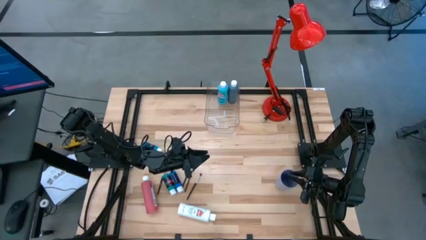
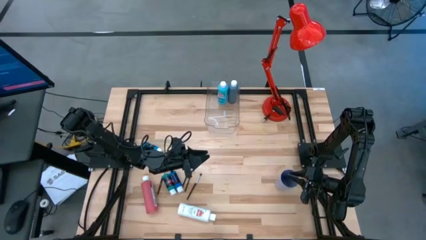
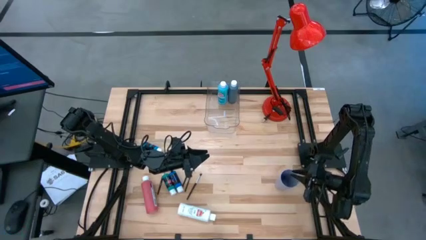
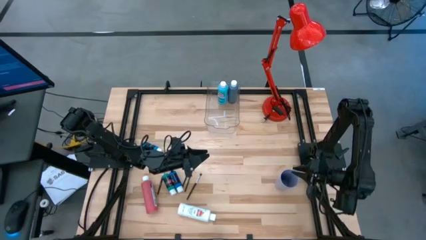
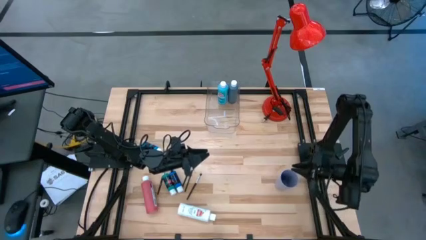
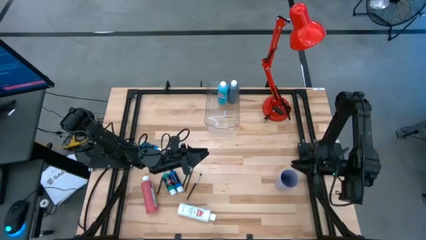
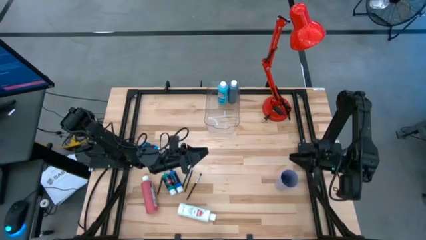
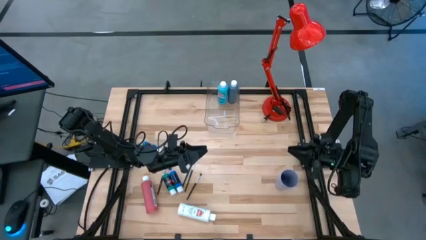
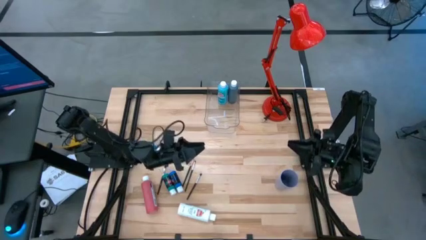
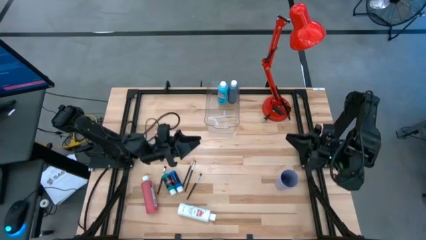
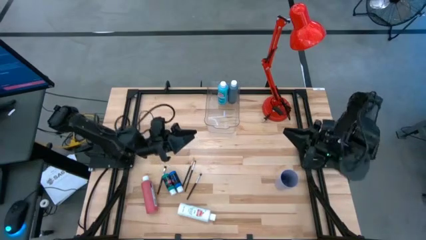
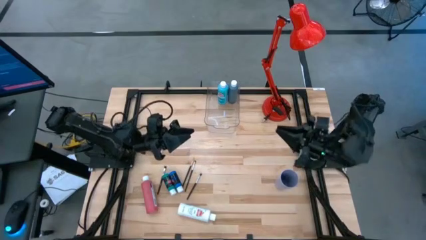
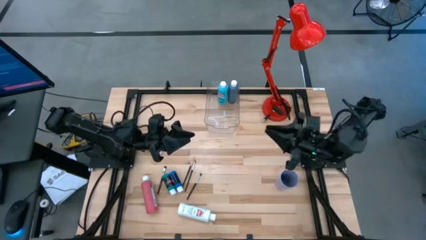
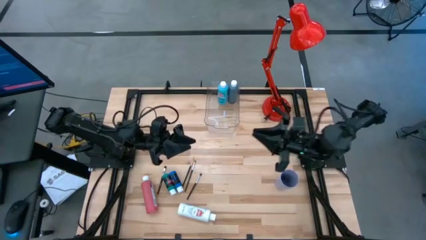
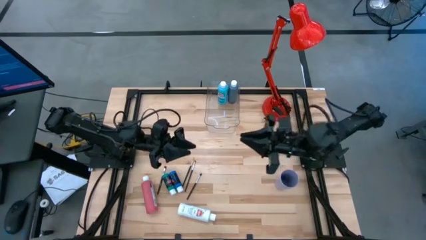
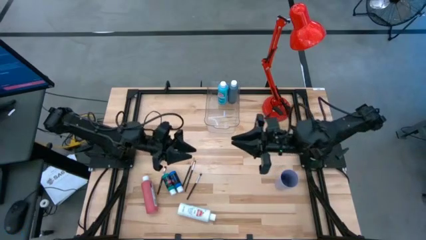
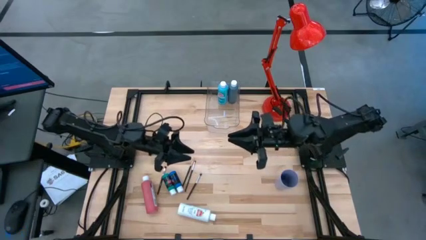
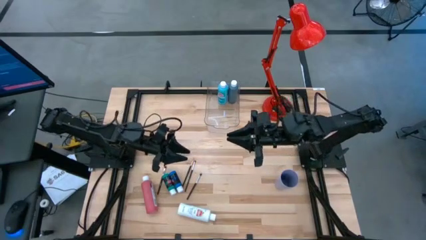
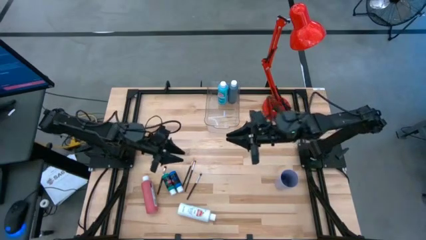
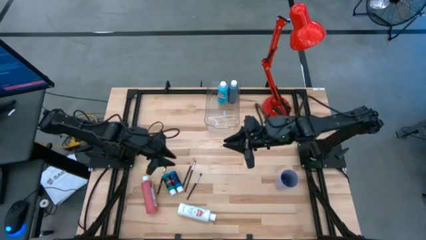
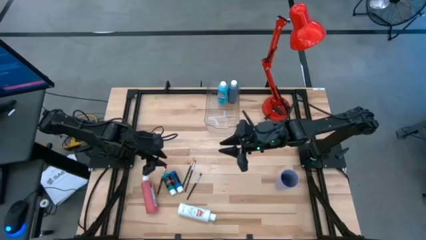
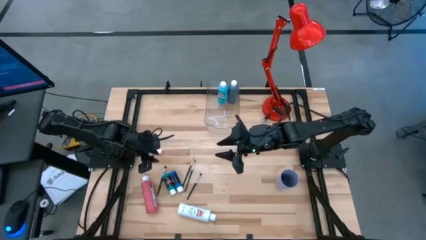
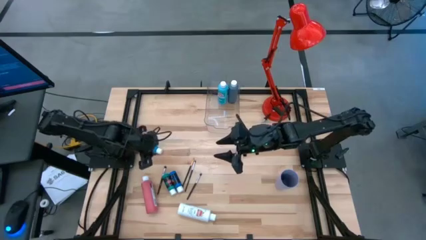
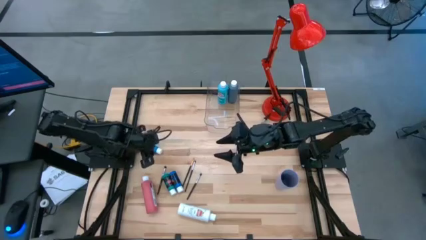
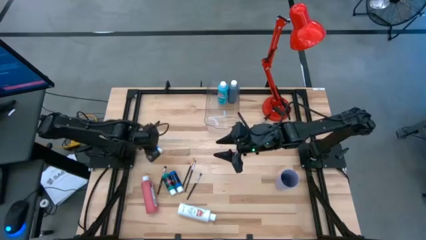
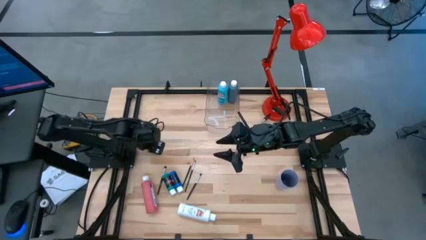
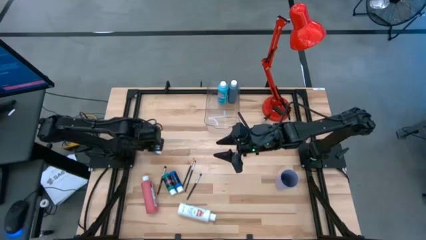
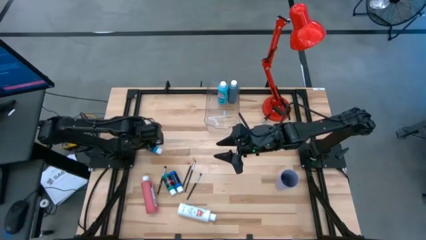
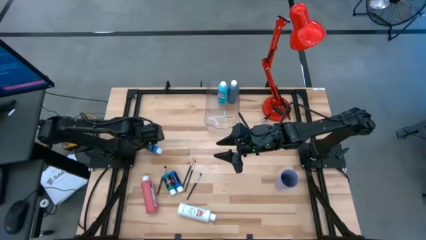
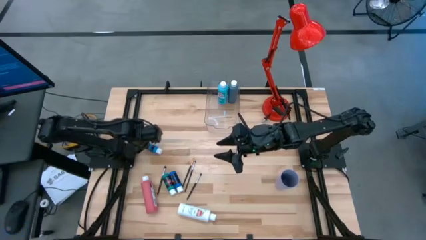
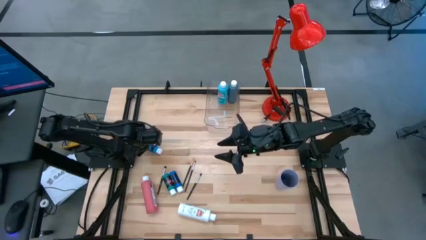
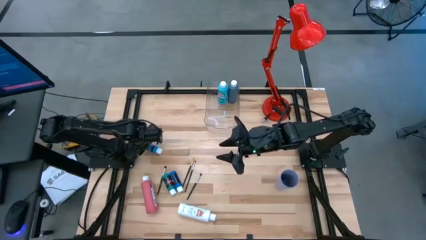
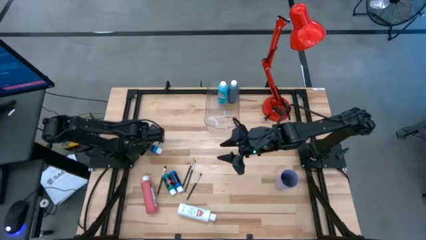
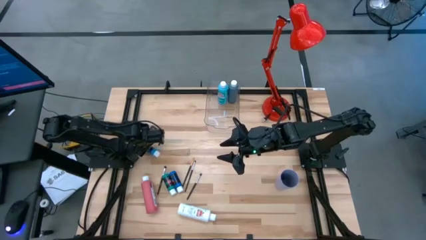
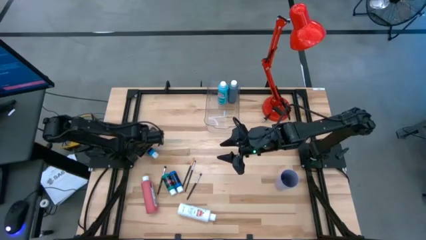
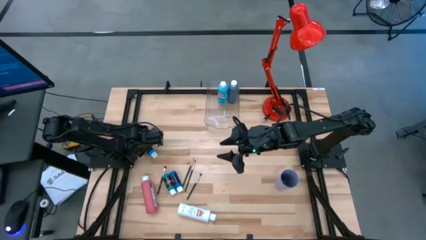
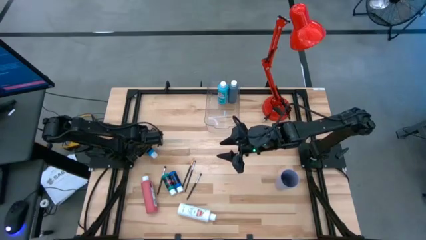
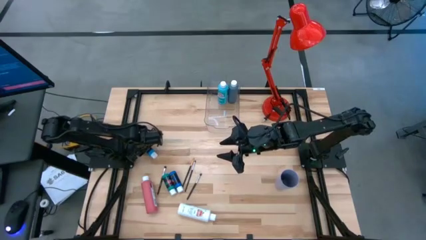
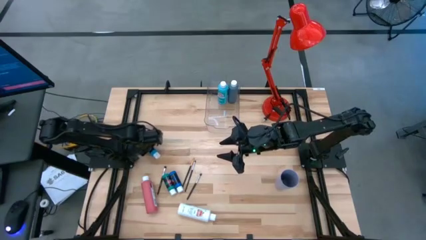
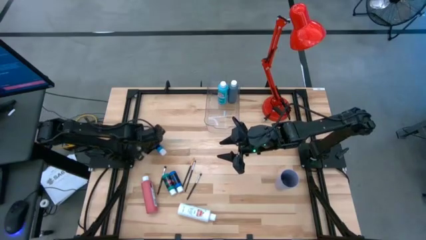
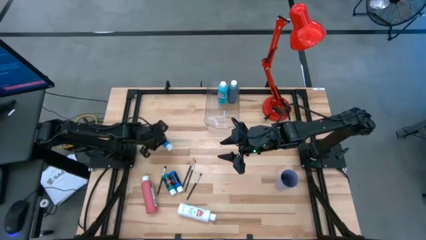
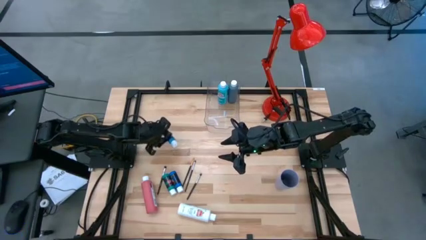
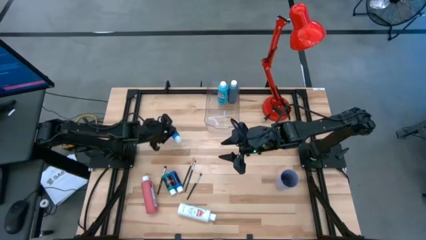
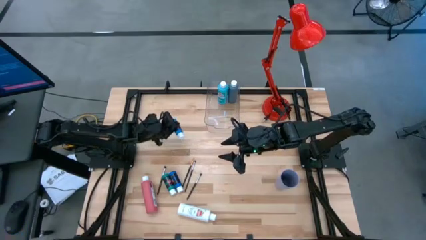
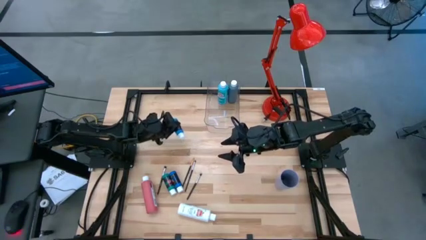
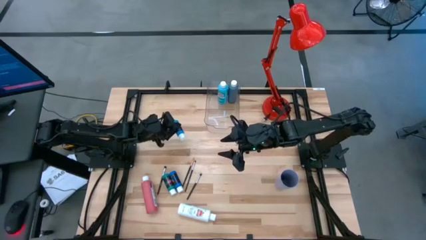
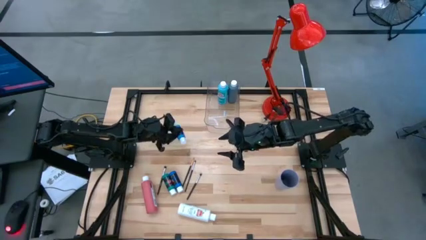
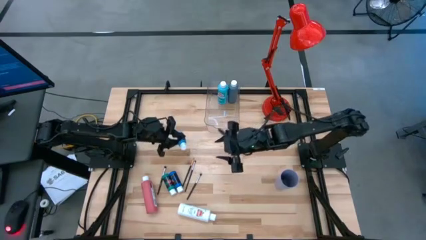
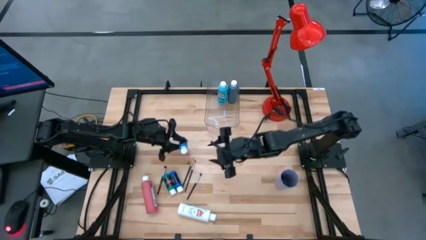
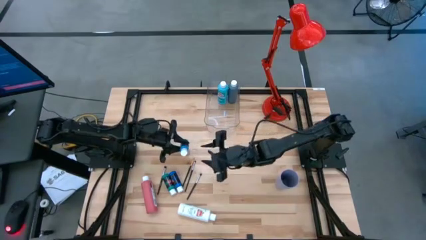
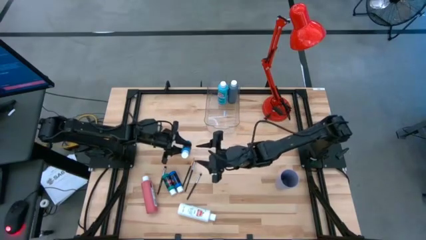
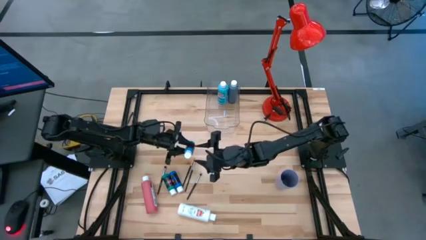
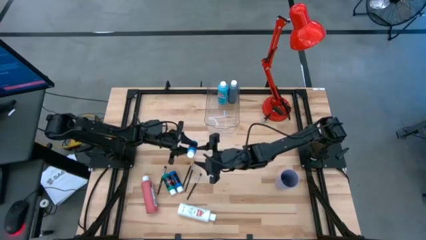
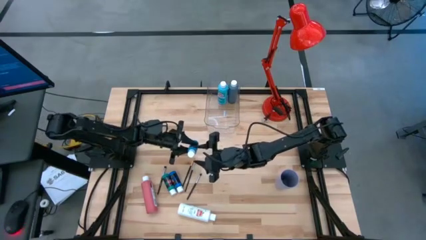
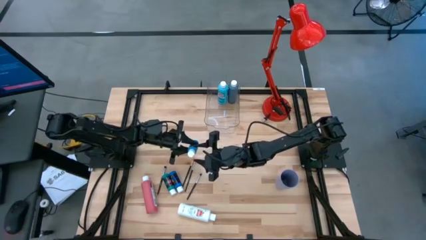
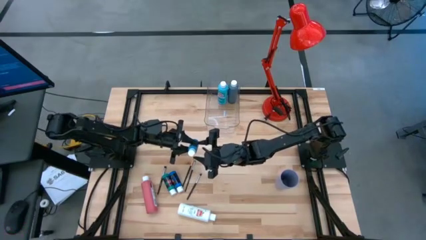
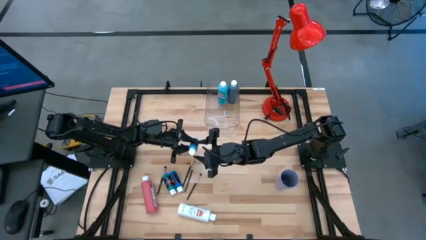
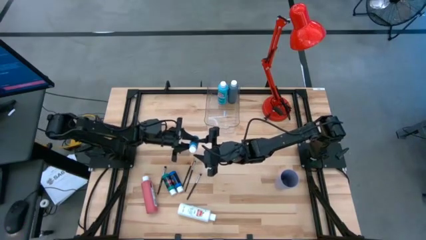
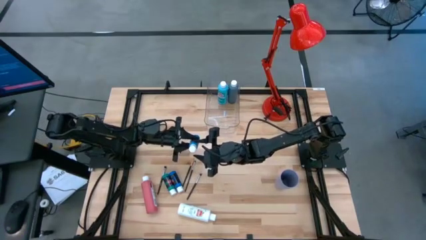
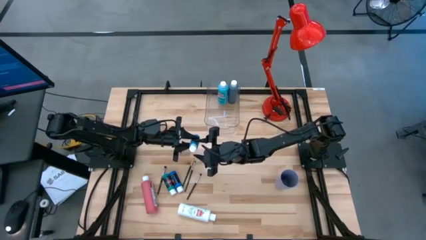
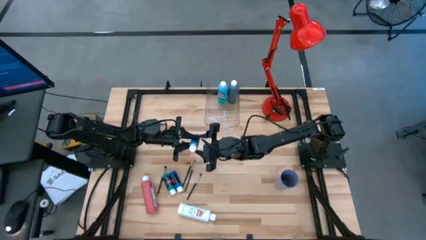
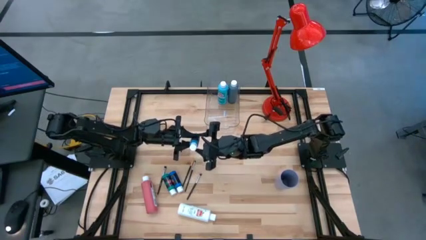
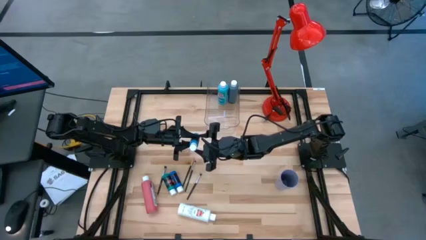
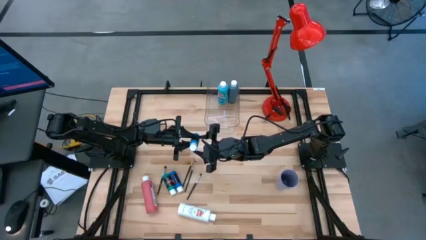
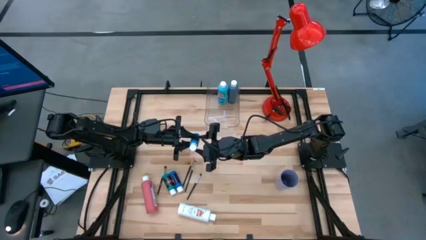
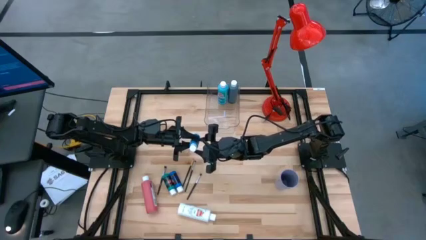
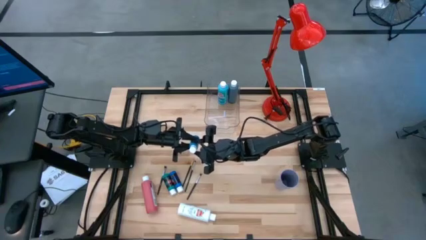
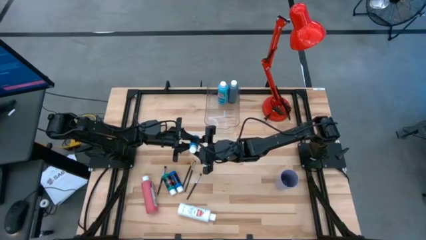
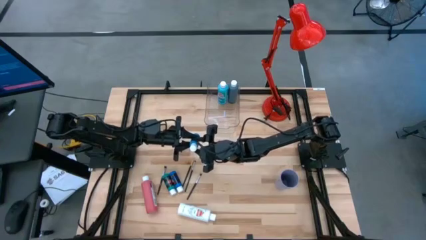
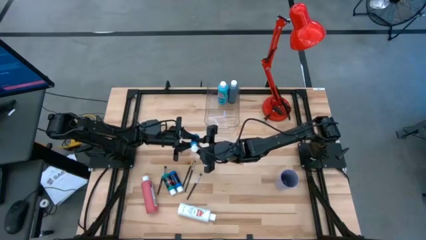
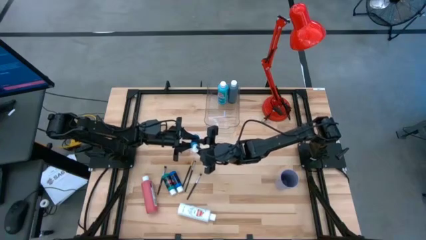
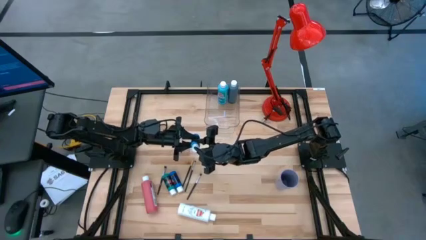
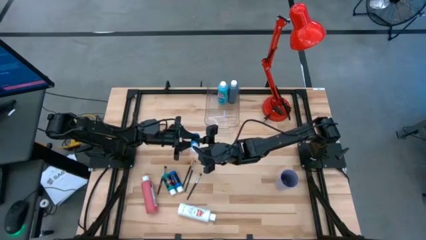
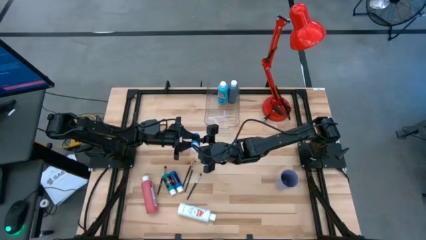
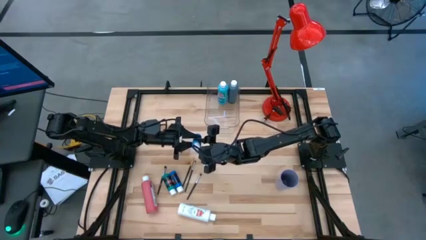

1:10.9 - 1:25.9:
Task: Pick & Place Paint Supplies
Put the blue paint bottle into the transparent bin
